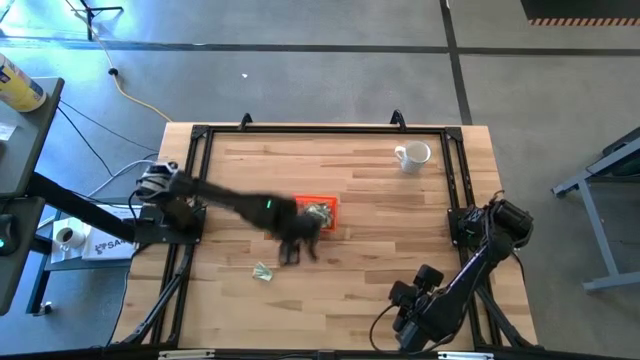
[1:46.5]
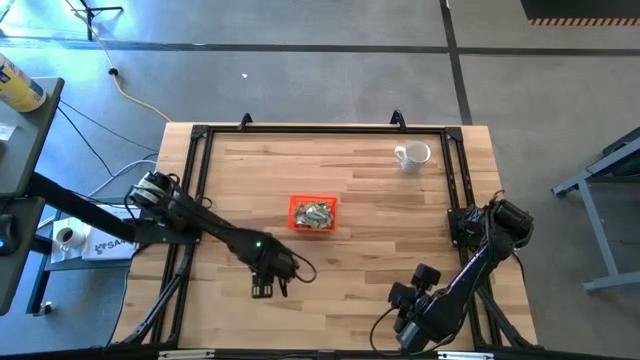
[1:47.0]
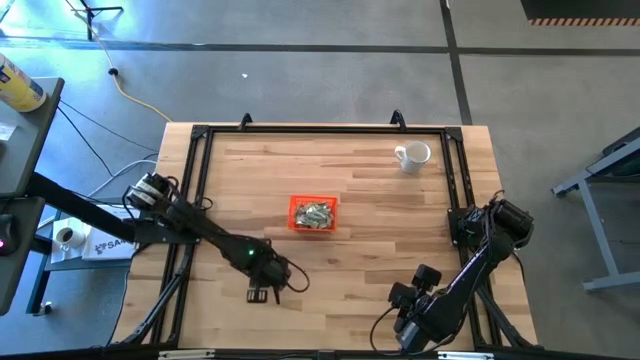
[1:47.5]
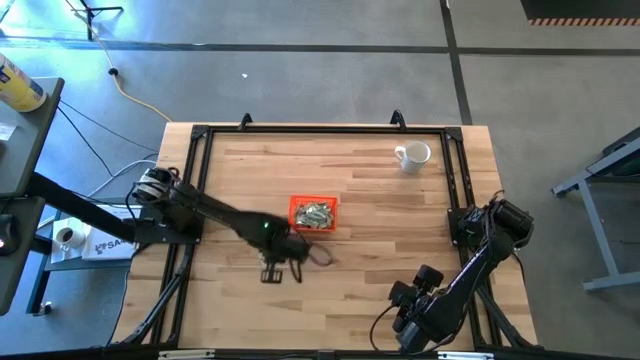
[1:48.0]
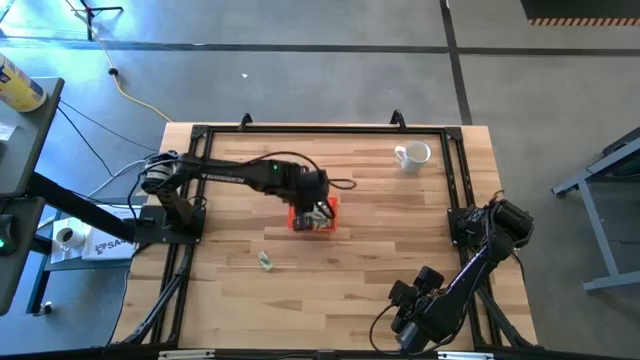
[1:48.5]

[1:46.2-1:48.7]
Task: Pick and place Stevia / Truvia into bins
Put the stevia packet into the orange bin

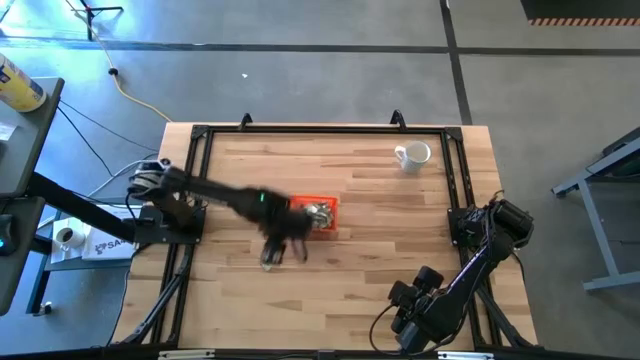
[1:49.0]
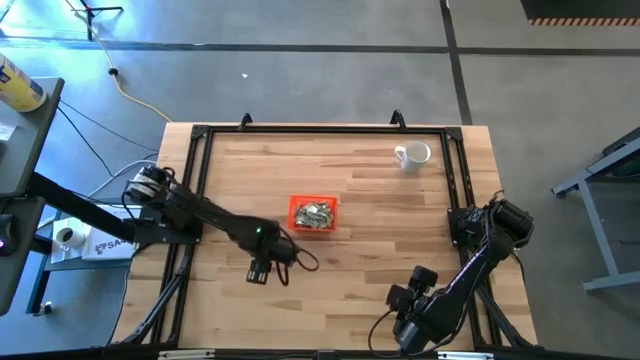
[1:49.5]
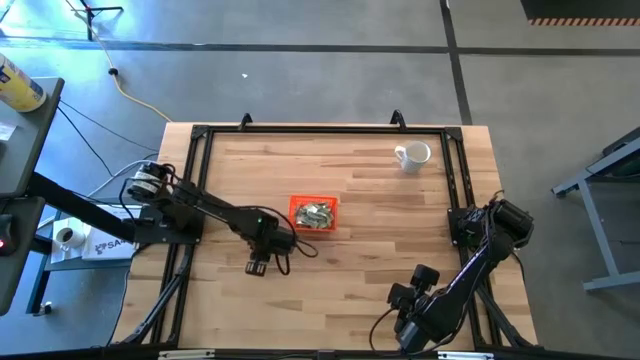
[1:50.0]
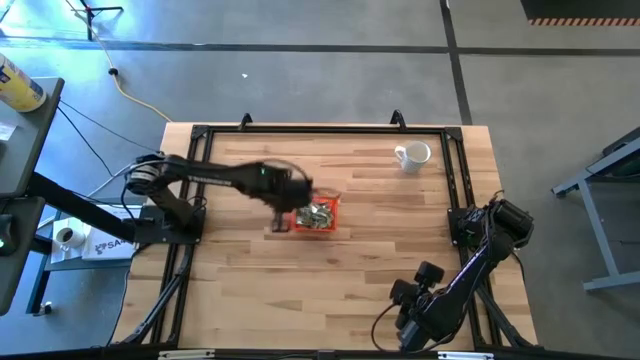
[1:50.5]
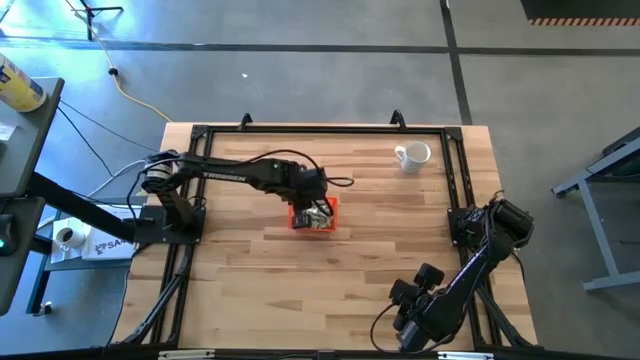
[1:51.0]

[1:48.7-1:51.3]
Put the stevia packet into the orange bin

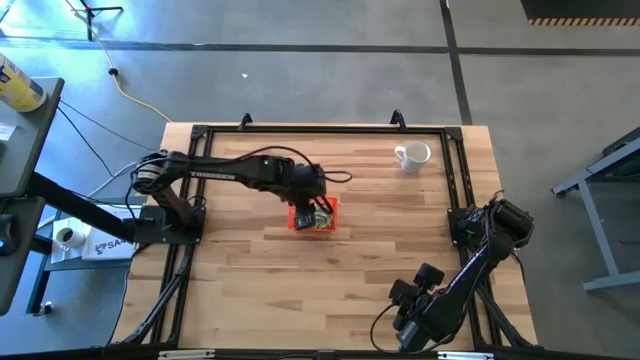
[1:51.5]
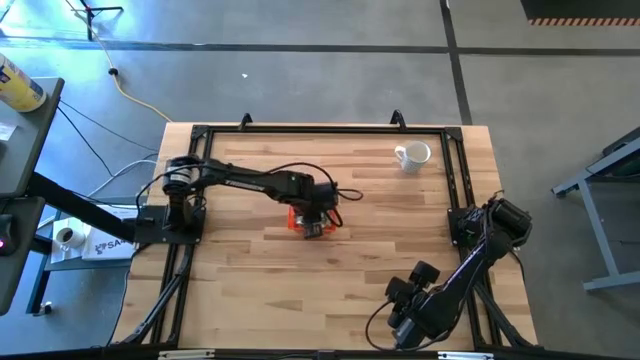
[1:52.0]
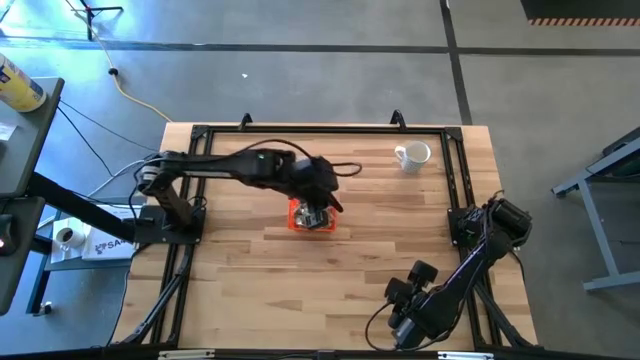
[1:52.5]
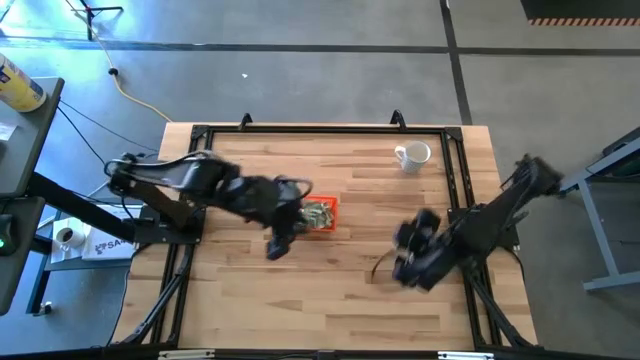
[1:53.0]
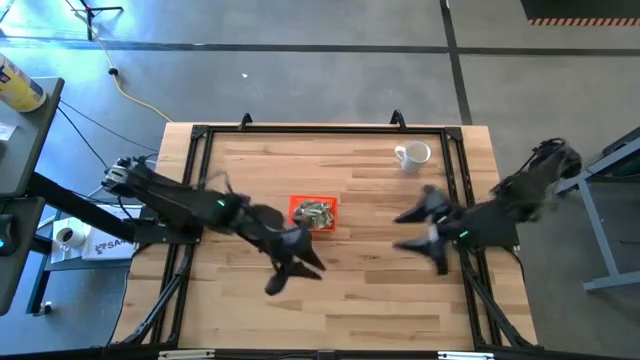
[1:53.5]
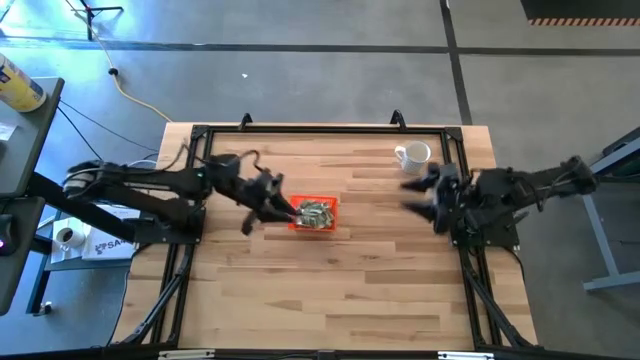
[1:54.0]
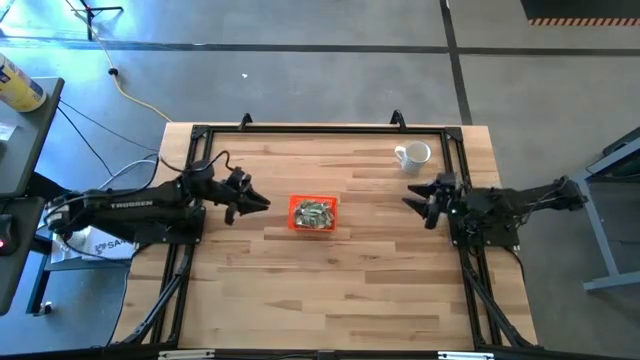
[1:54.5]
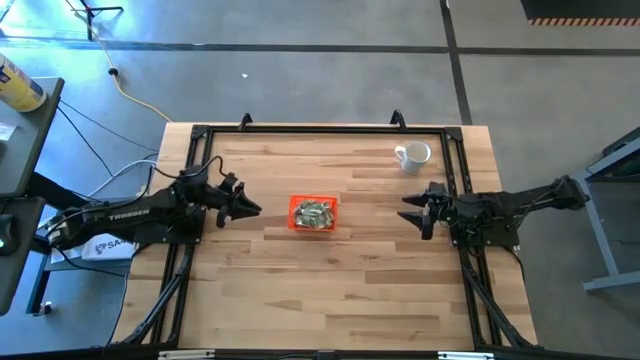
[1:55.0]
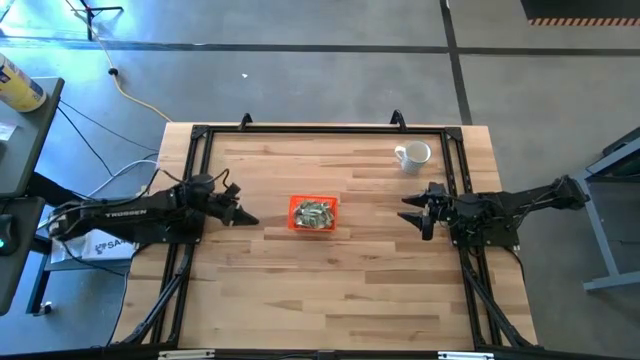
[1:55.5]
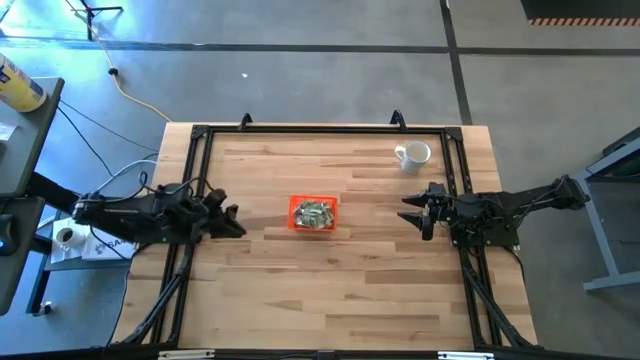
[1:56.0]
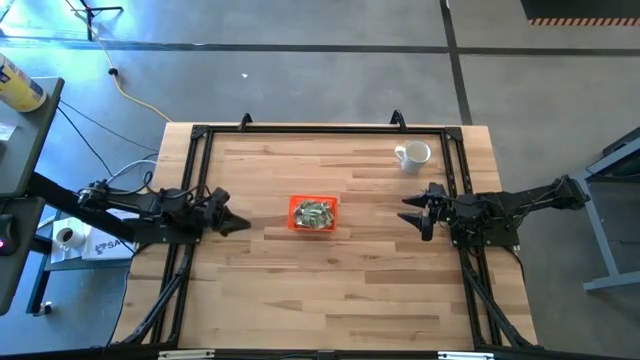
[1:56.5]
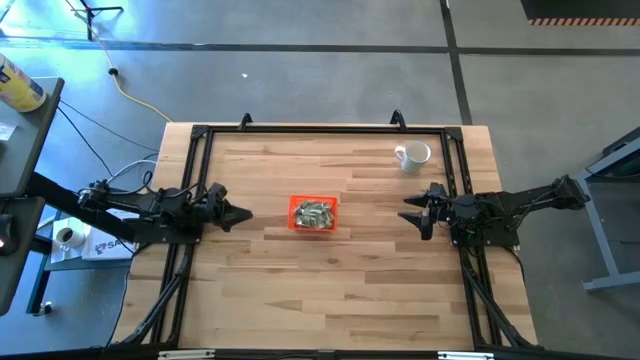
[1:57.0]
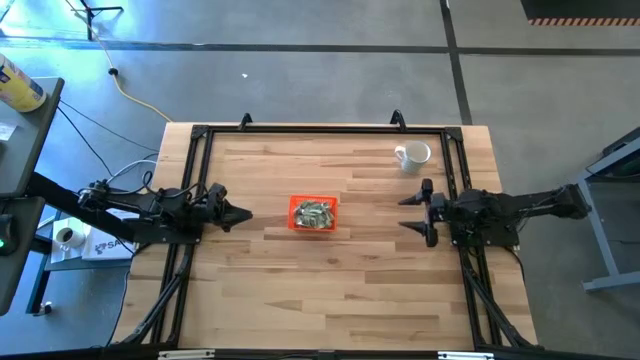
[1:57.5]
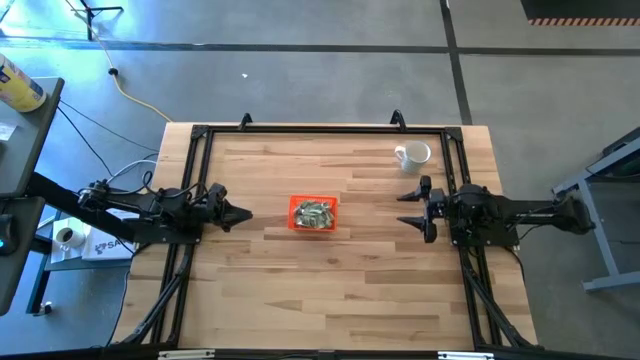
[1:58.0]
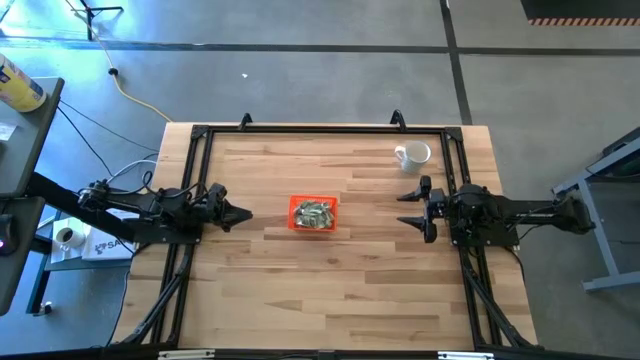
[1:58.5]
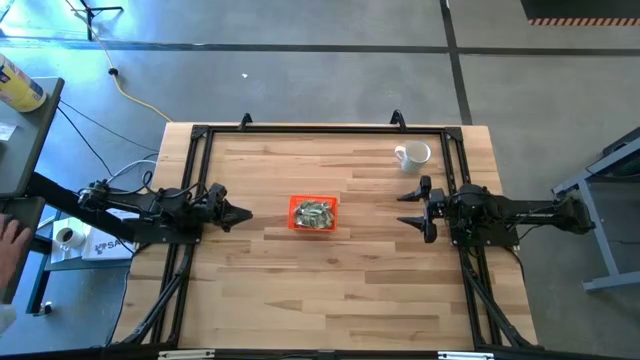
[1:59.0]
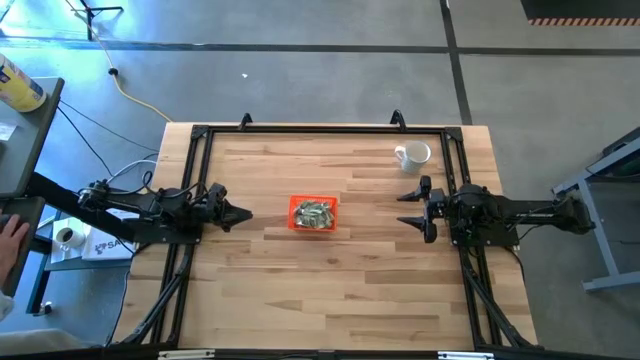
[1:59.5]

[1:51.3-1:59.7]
Return to Home Position

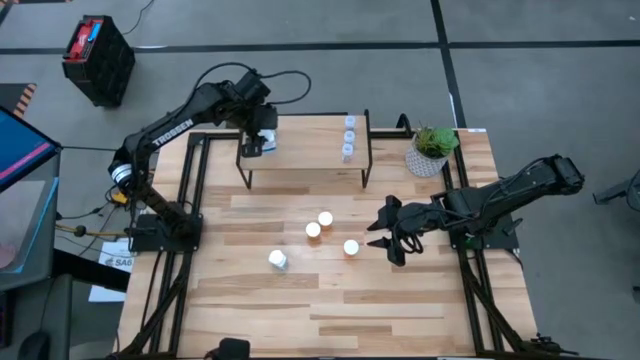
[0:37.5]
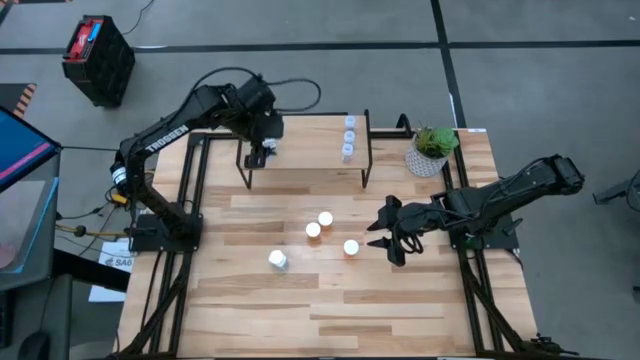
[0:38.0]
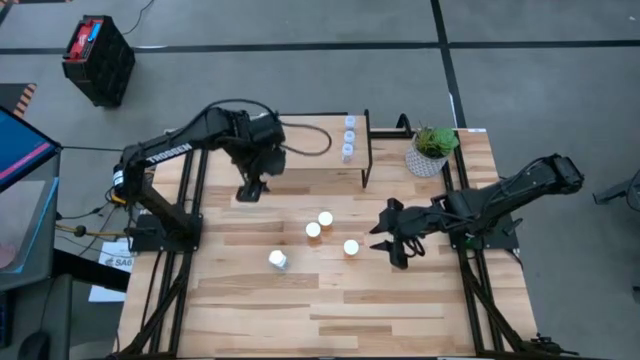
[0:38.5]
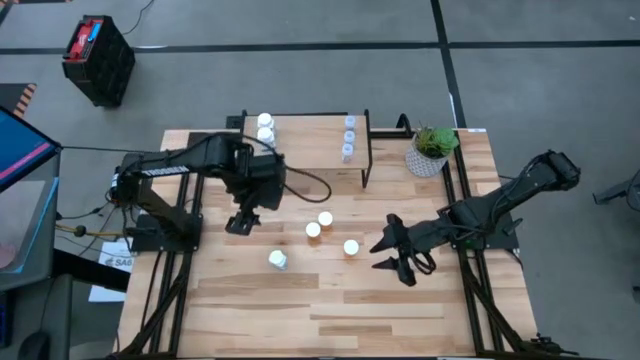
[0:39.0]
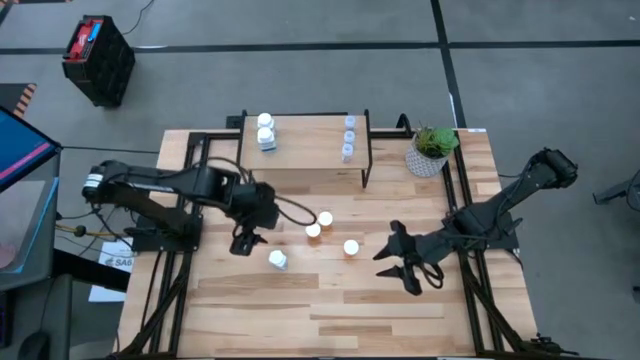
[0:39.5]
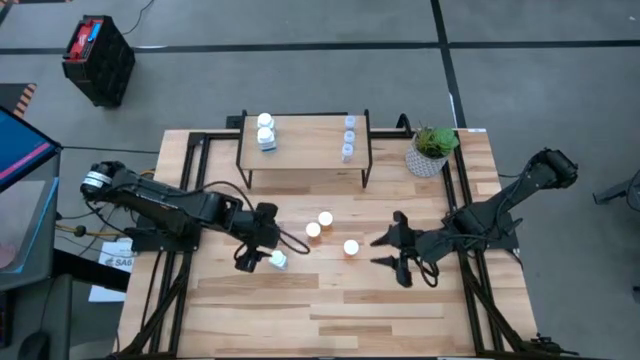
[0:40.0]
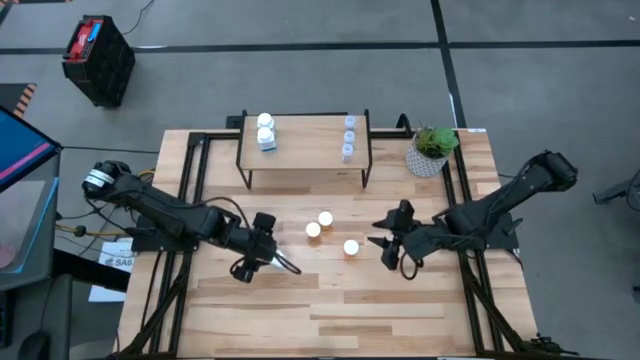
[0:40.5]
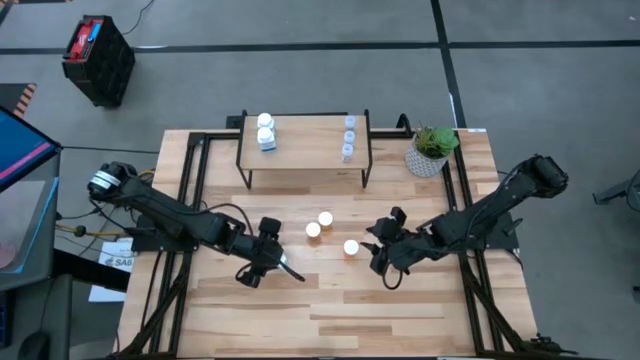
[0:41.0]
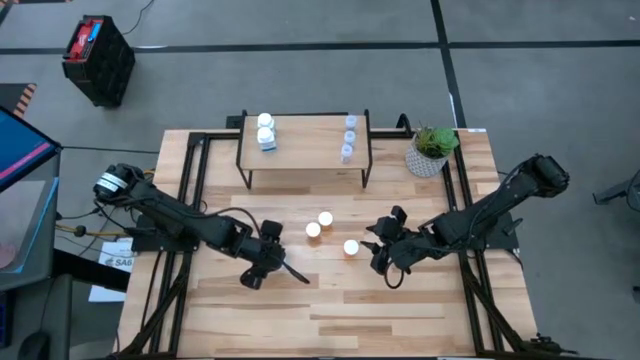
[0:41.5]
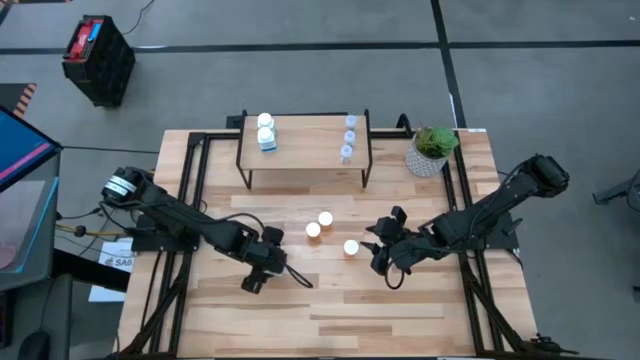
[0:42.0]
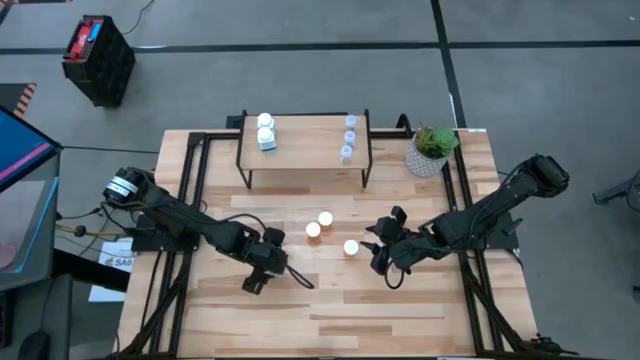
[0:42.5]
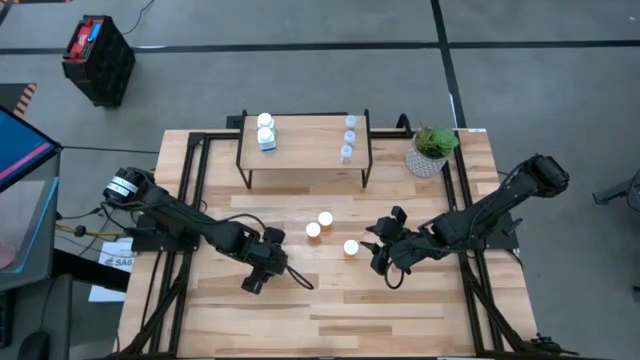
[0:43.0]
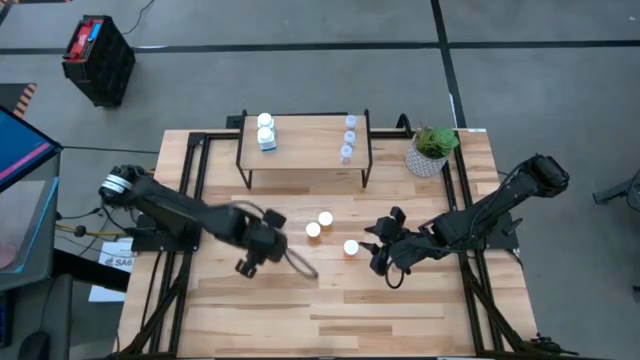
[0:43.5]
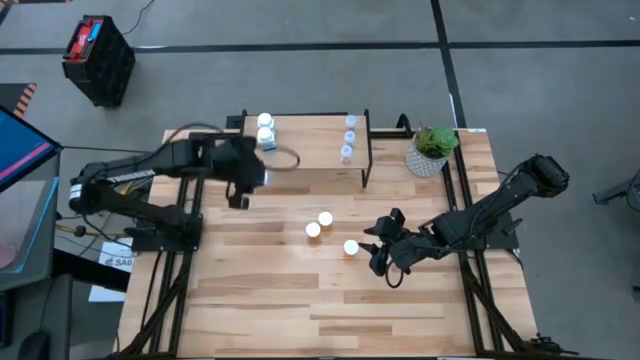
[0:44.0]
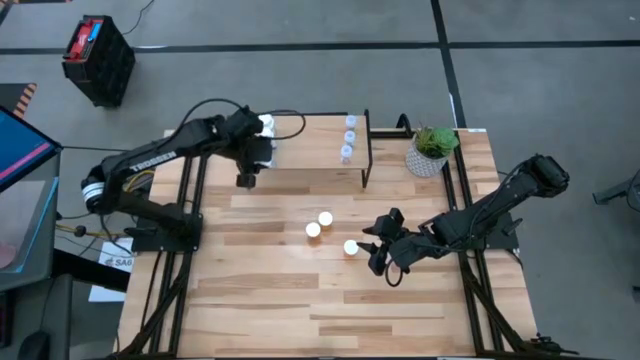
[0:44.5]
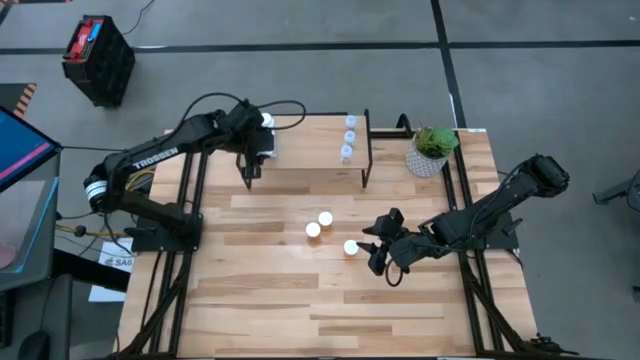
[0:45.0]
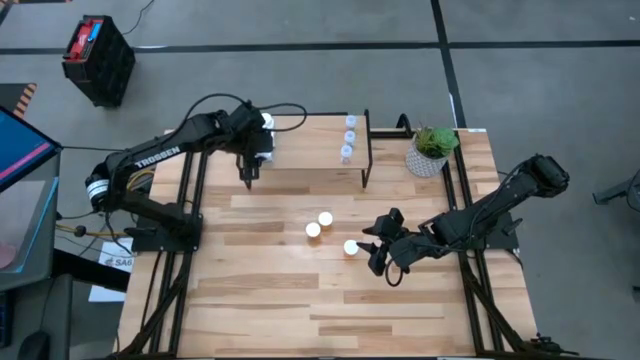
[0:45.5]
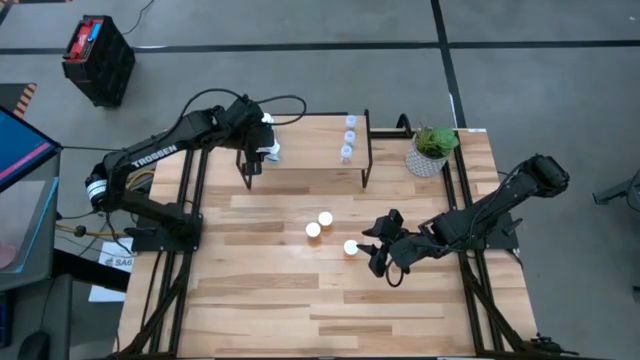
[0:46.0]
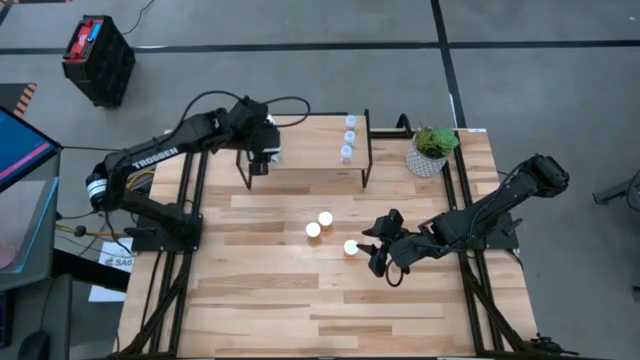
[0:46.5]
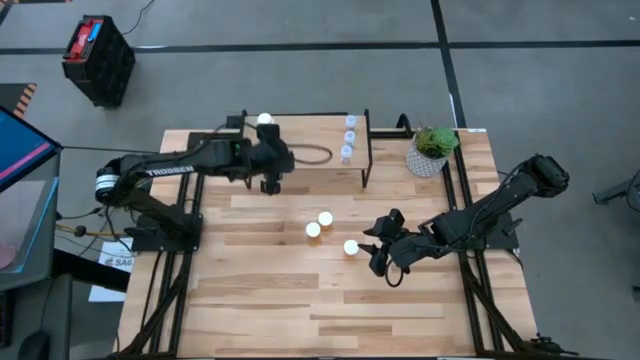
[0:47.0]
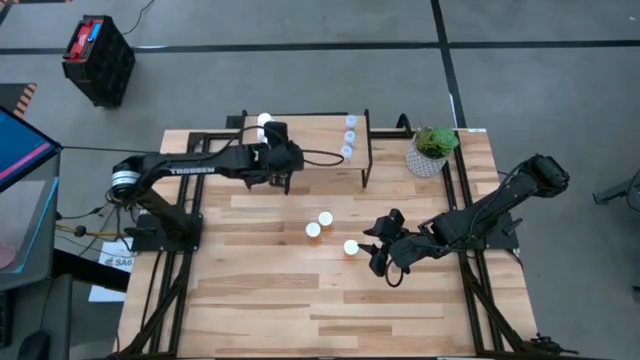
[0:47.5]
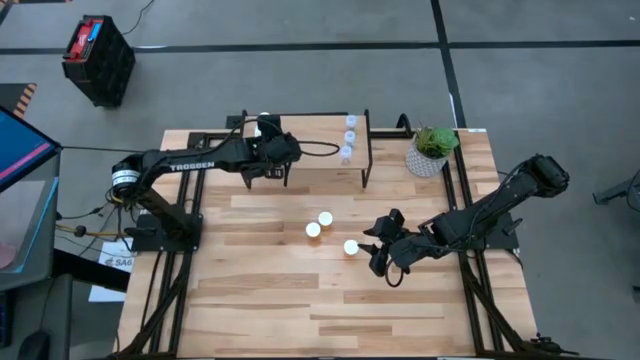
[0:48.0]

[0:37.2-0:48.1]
Task: Pick and place medicine bottles onto shelf by color
Put the white pill bottle on the shelf aligned with the other white pill bottles
